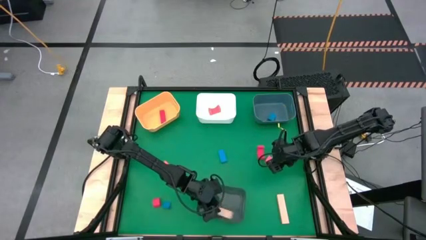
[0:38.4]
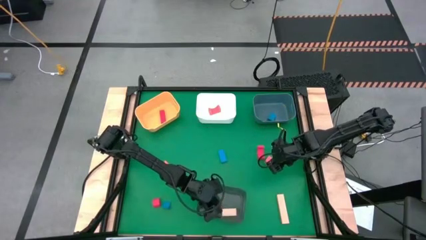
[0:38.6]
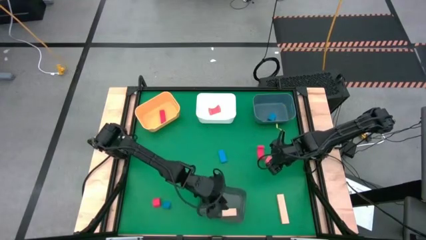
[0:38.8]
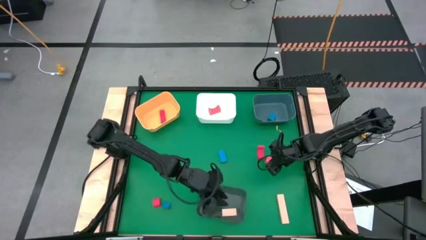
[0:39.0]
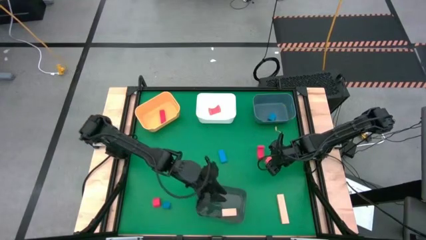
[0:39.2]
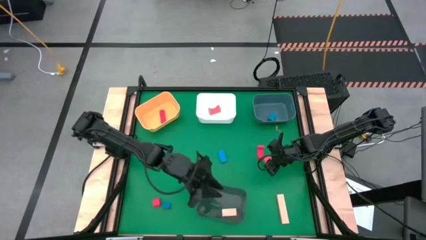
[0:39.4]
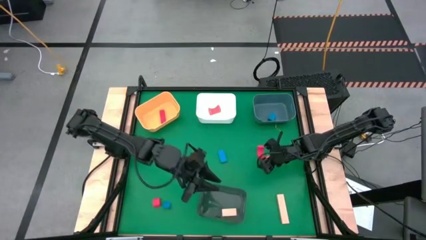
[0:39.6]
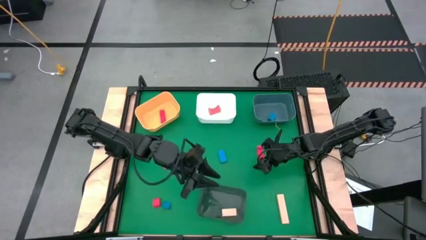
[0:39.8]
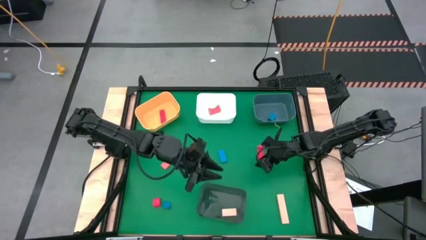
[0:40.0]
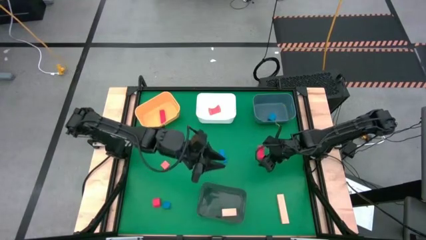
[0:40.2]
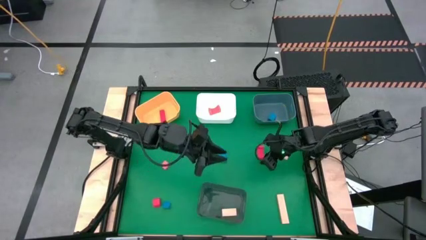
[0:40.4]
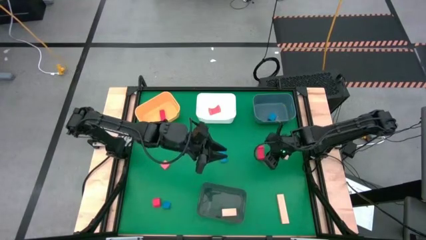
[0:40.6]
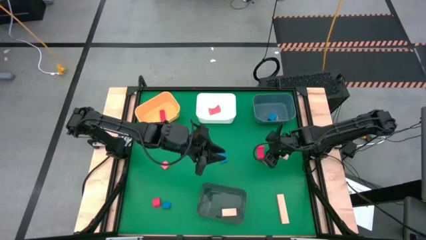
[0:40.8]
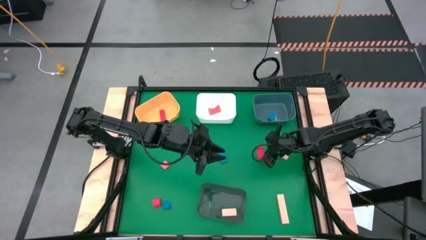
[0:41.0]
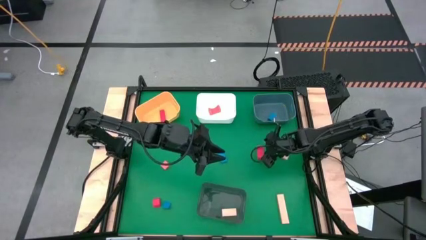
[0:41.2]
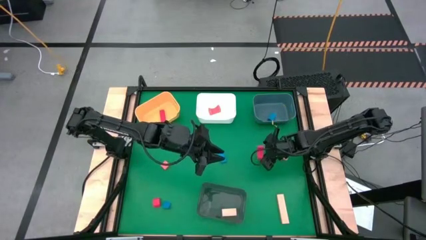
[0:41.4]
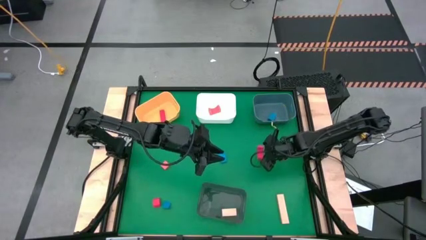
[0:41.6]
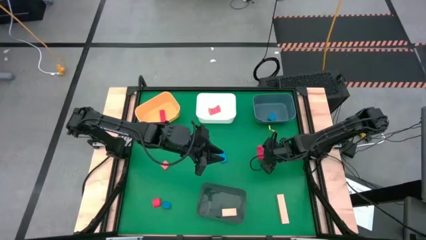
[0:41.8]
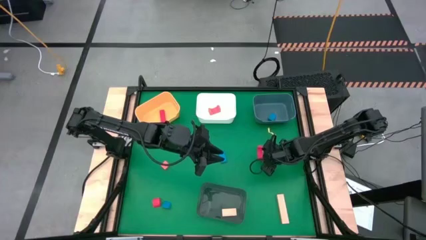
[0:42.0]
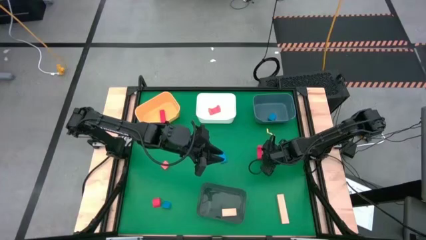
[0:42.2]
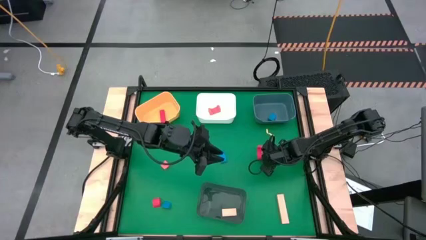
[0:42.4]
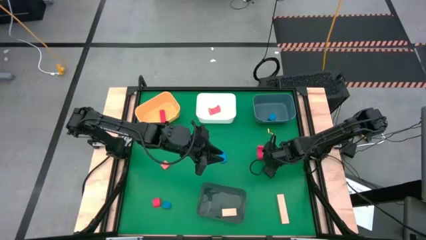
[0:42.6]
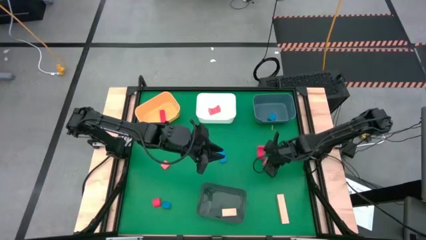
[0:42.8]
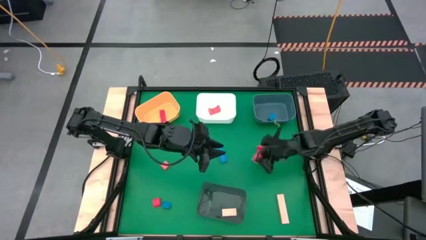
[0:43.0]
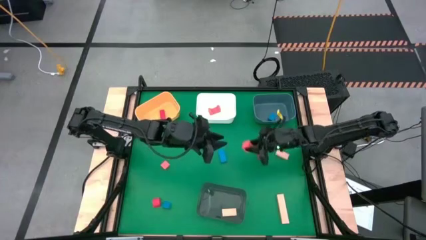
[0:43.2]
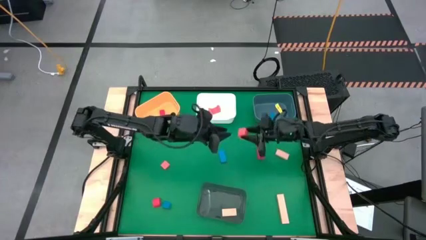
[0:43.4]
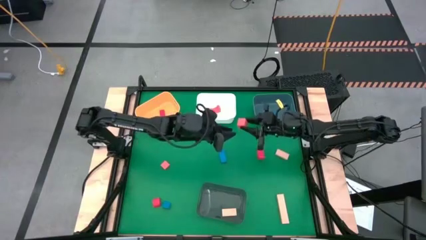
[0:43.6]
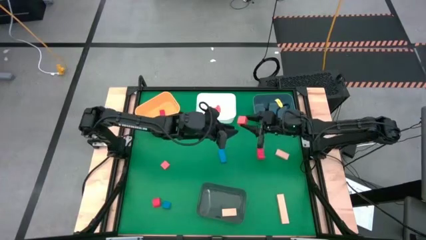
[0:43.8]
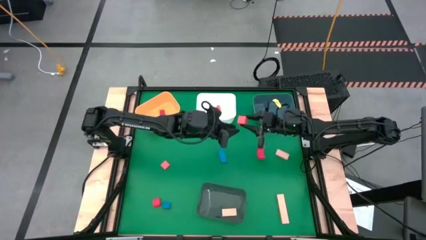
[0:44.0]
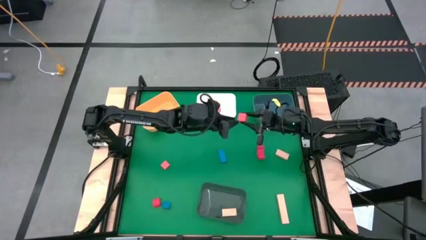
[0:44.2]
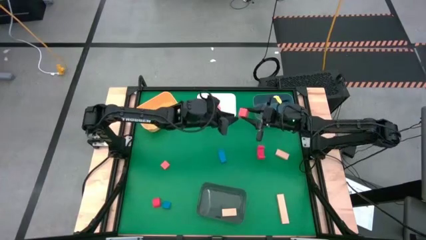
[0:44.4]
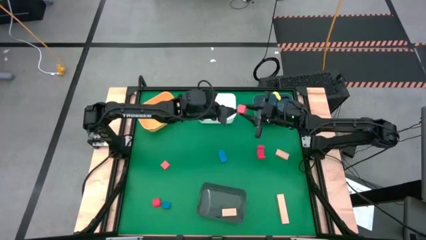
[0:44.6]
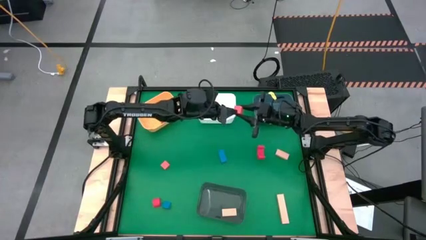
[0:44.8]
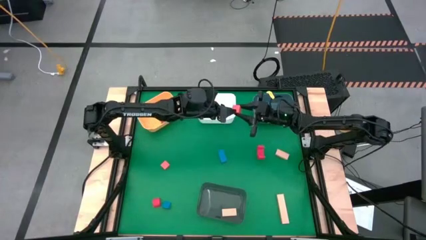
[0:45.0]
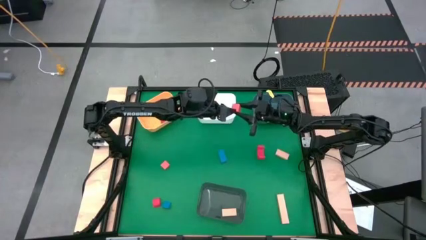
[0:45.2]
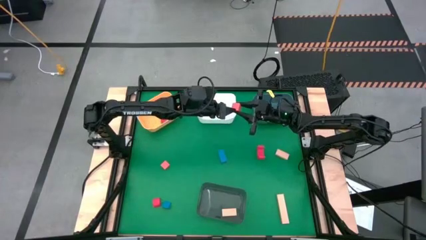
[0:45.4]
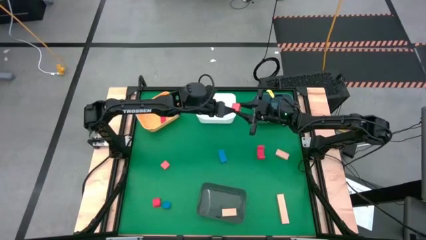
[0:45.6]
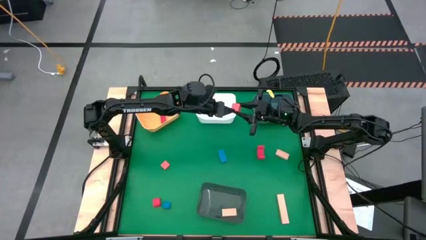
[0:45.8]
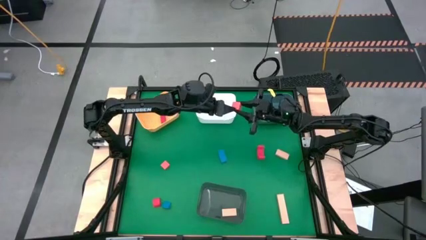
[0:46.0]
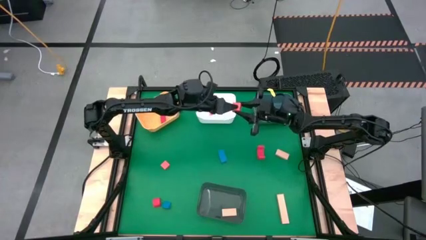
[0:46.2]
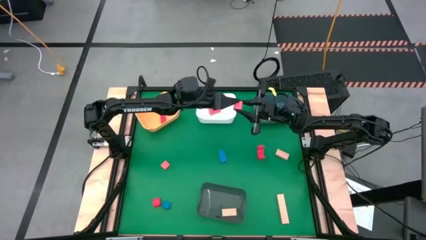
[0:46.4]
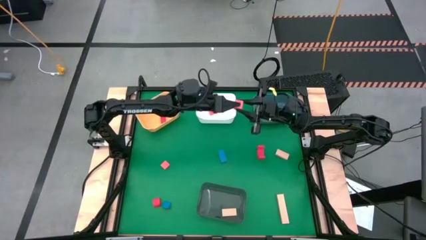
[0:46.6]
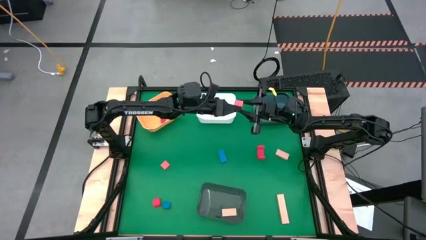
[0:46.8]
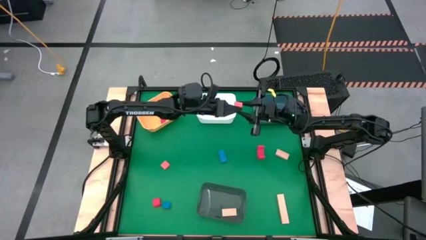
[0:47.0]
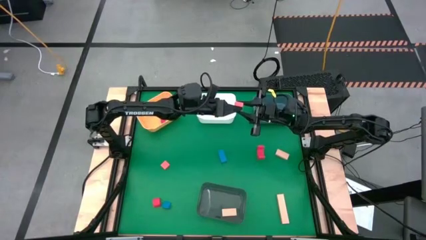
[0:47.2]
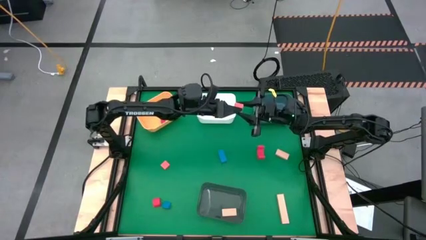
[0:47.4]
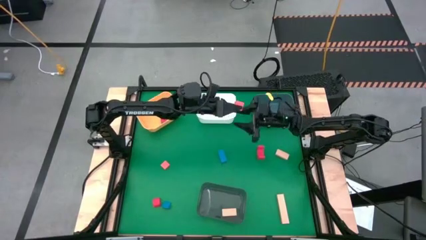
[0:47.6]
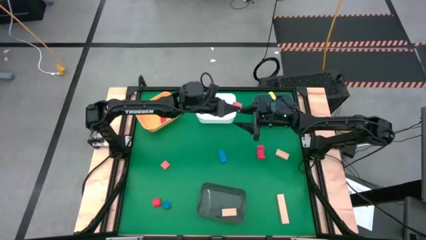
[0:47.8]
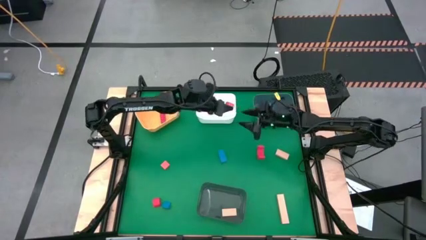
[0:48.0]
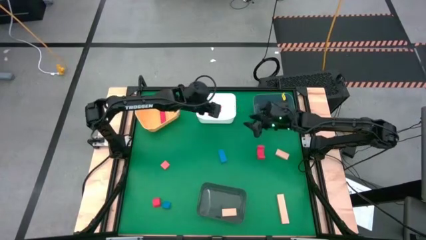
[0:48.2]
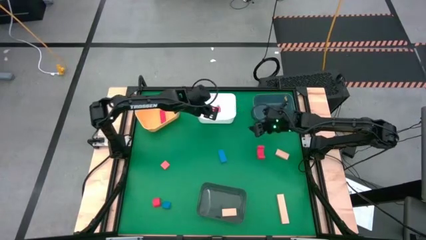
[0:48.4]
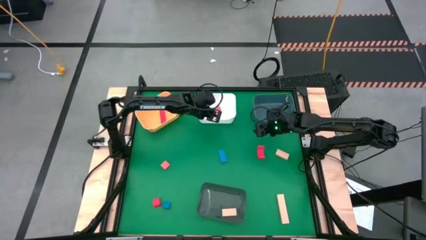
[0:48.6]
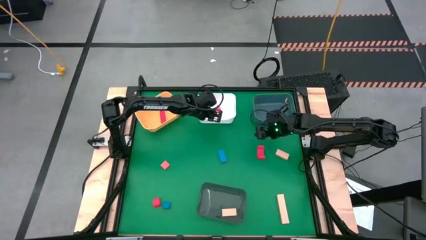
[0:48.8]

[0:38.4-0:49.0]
Task: Sort & place blocks by color
Put the orange block into the white bin

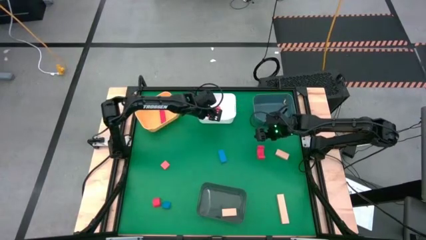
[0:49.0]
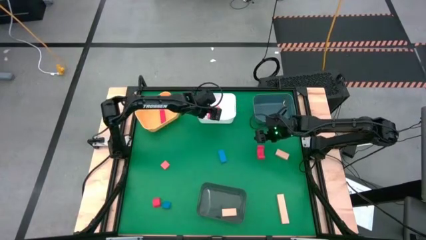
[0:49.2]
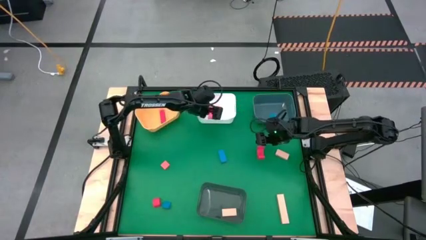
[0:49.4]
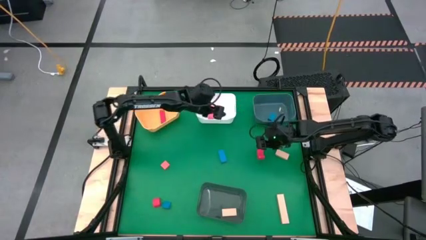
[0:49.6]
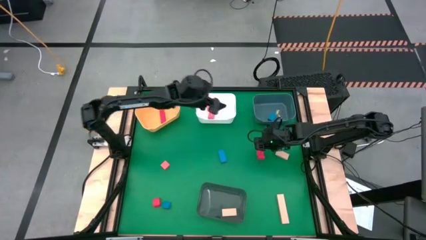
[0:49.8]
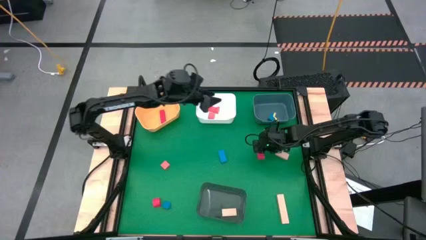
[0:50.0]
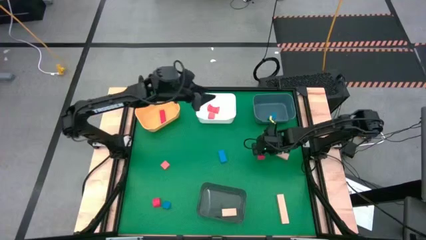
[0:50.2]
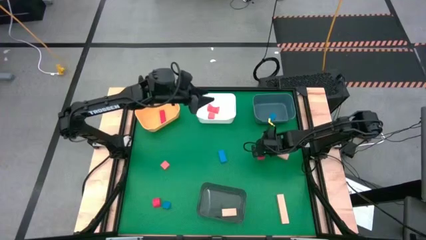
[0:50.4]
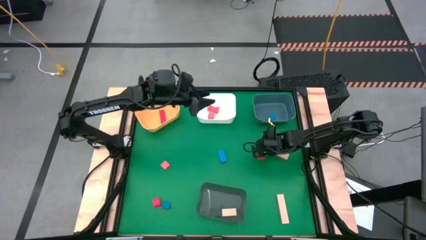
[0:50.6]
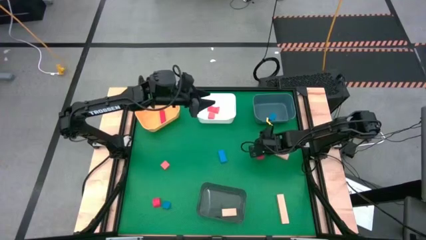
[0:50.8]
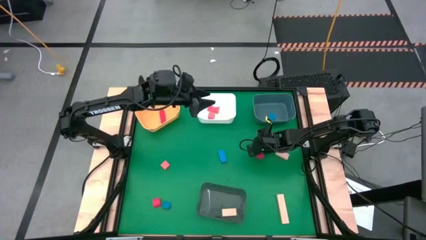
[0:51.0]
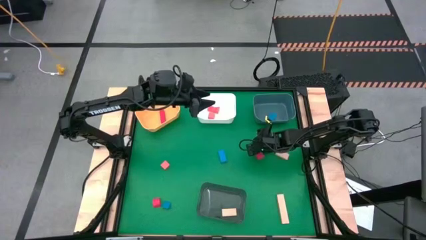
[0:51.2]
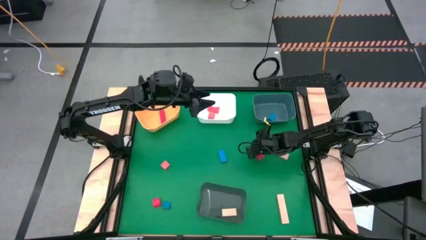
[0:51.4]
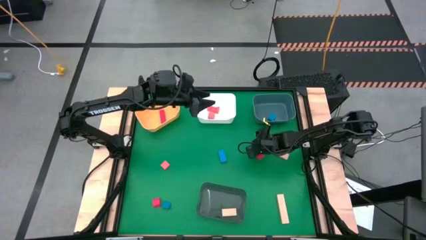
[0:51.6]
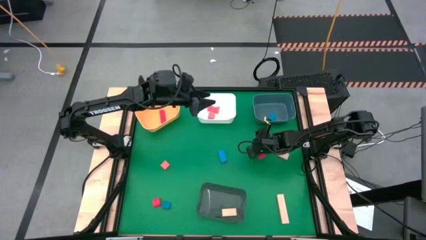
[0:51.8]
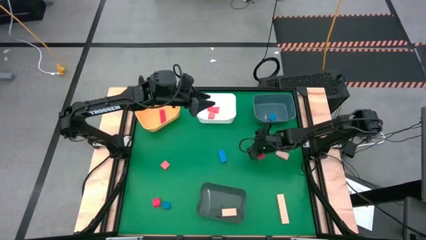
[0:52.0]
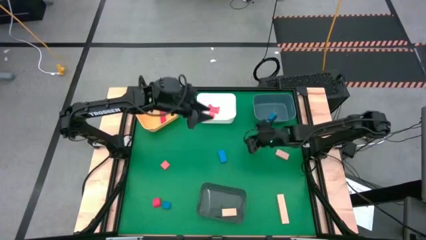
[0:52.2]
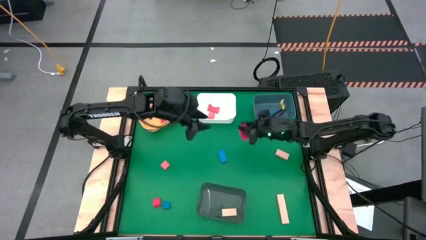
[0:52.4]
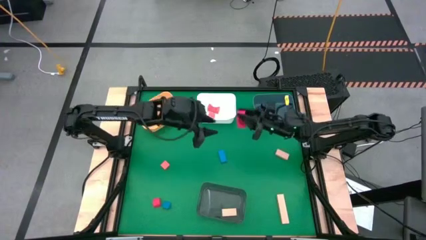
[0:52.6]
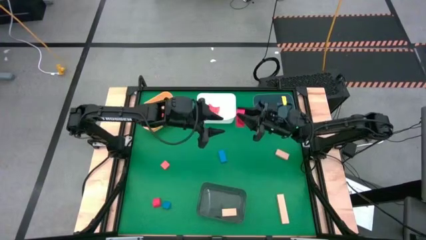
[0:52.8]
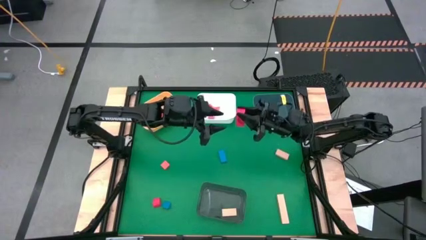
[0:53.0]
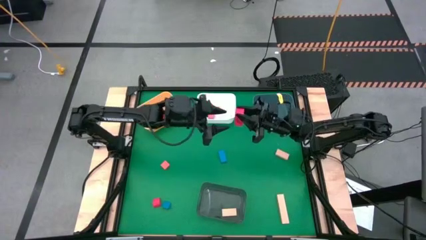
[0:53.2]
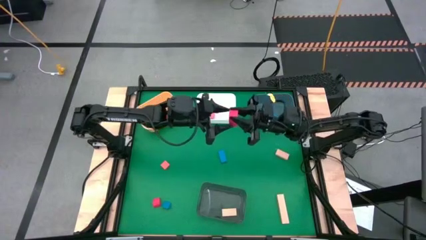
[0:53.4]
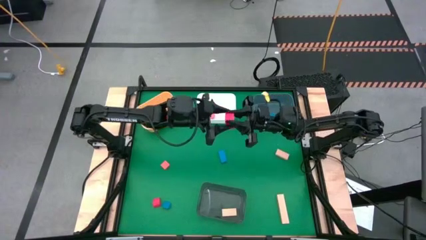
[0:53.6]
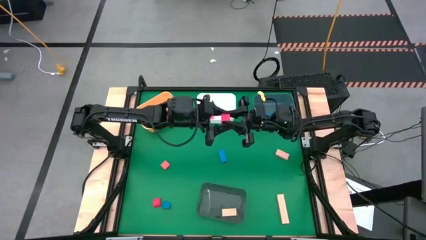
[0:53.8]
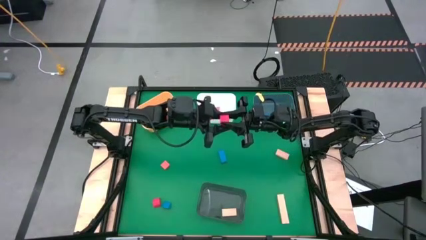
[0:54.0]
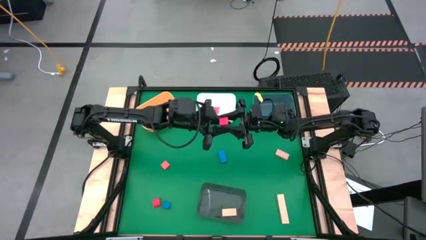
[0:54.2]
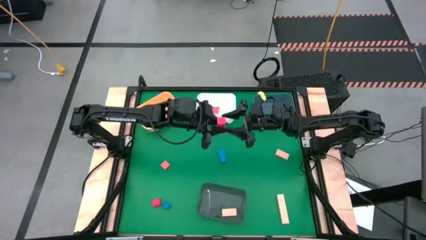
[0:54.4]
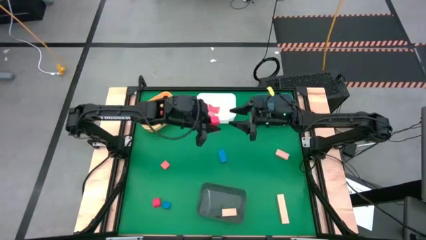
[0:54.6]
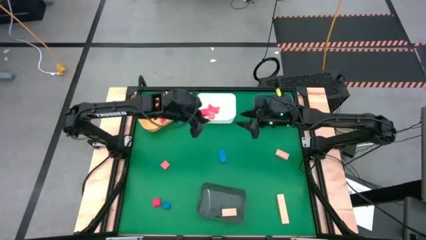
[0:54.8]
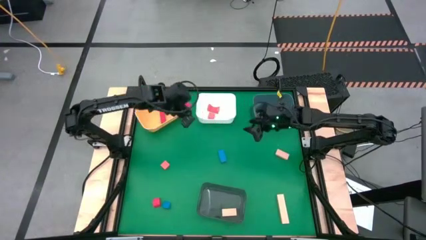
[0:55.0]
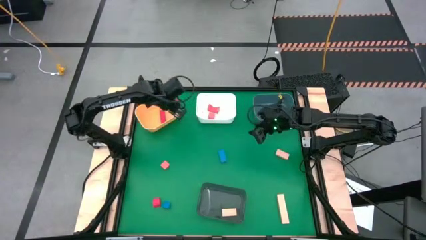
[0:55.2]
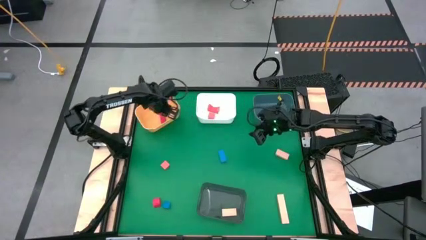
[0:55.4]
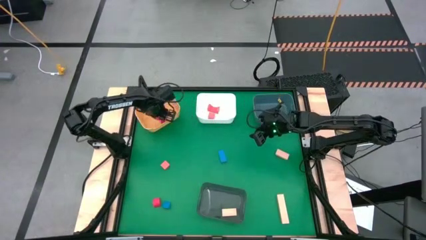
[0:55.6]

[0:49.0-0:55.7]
Put the red block into the yellow bin
